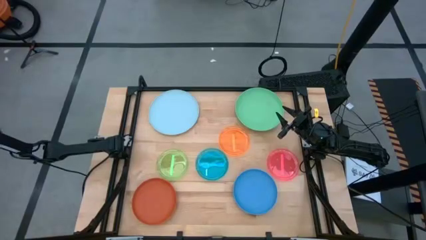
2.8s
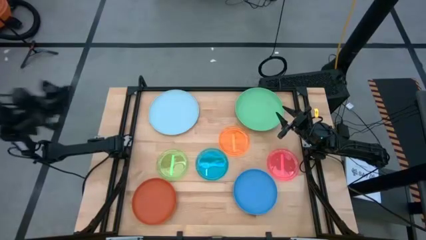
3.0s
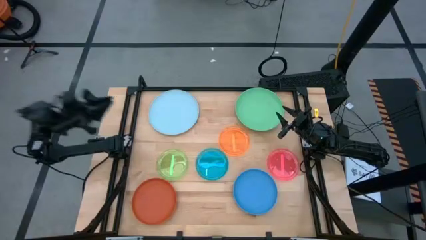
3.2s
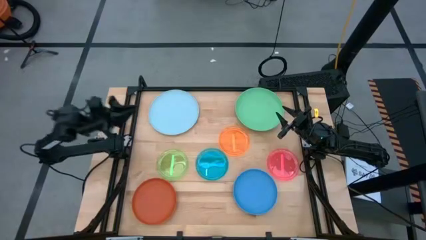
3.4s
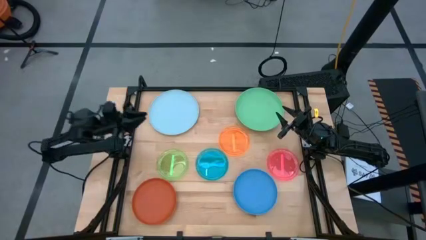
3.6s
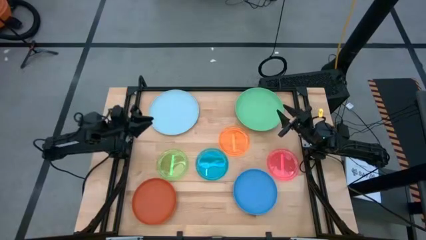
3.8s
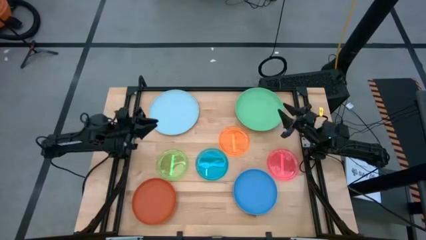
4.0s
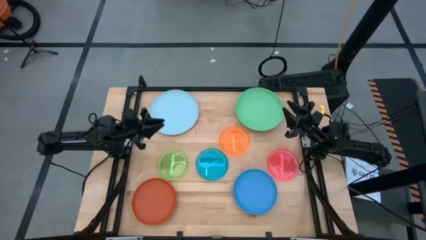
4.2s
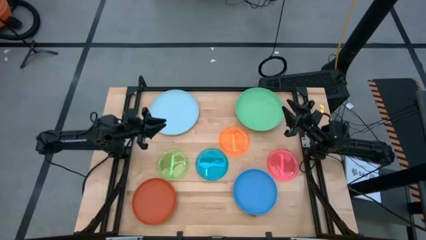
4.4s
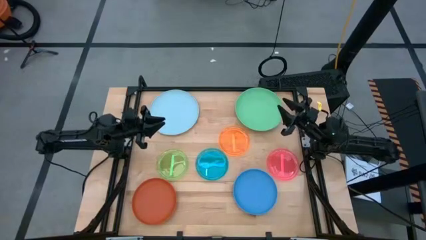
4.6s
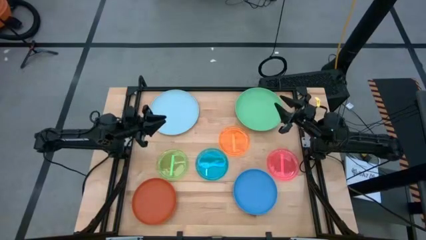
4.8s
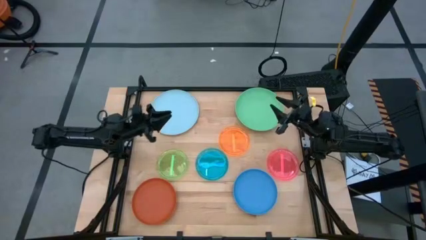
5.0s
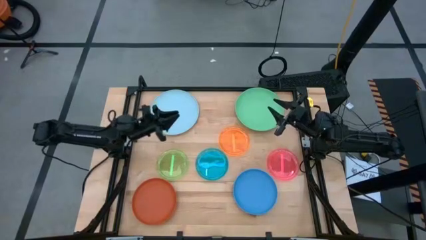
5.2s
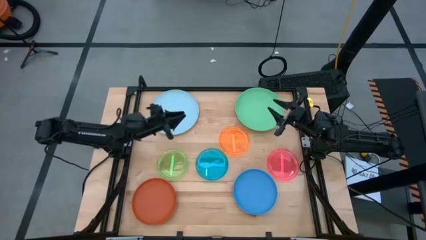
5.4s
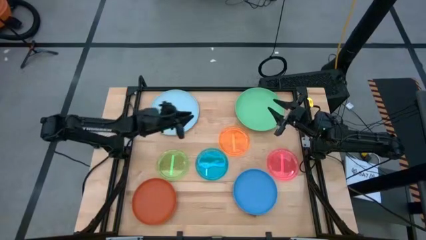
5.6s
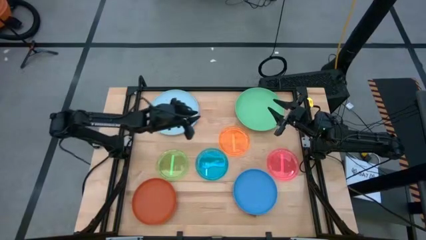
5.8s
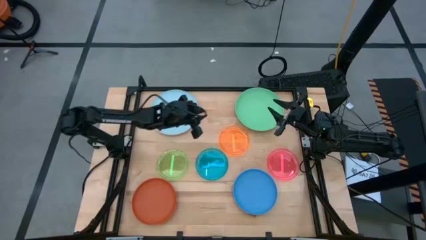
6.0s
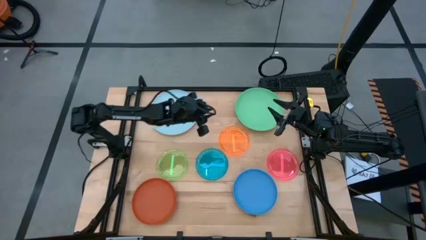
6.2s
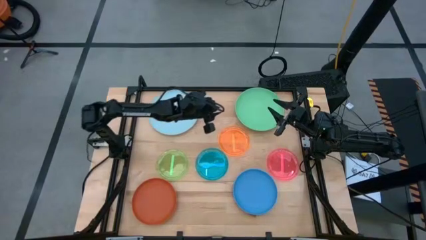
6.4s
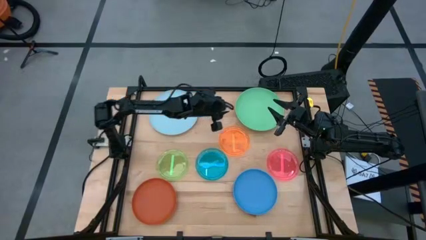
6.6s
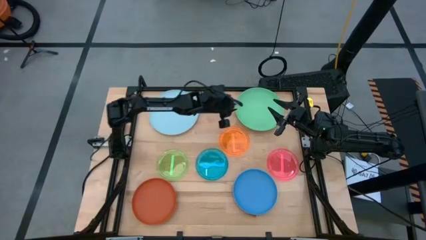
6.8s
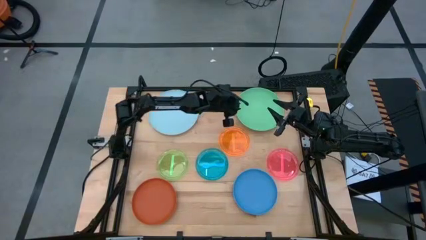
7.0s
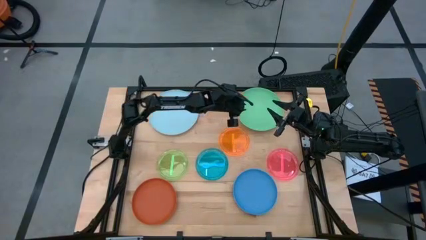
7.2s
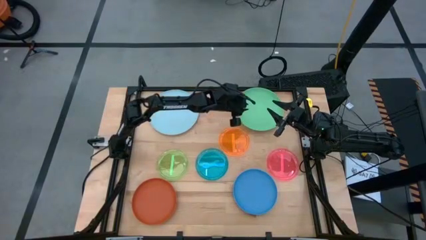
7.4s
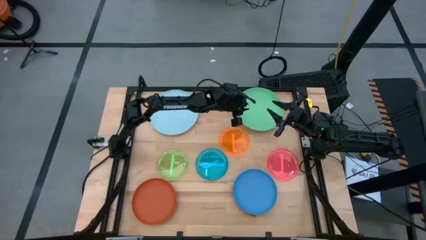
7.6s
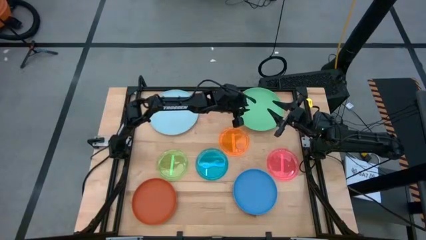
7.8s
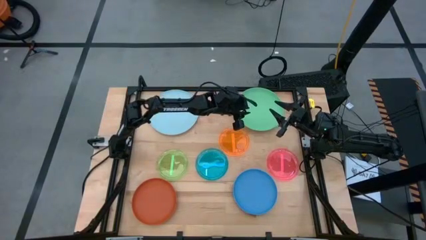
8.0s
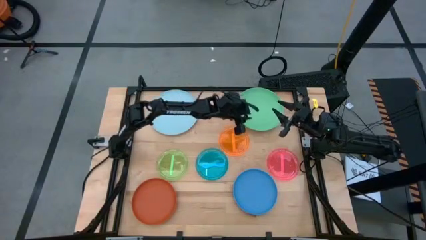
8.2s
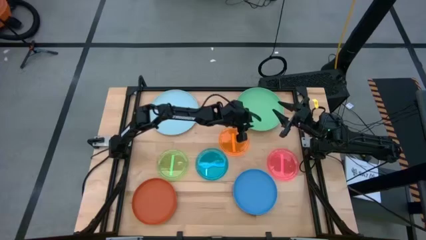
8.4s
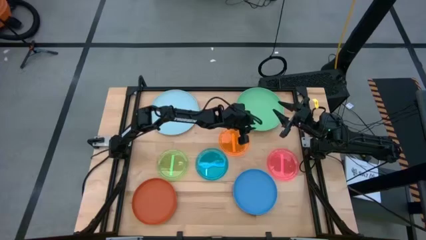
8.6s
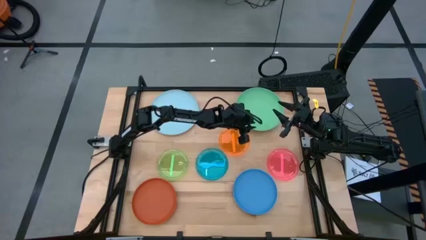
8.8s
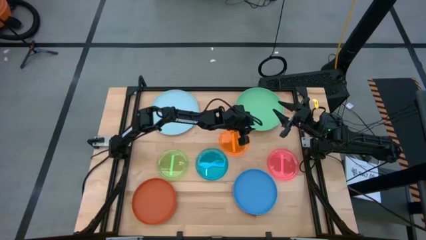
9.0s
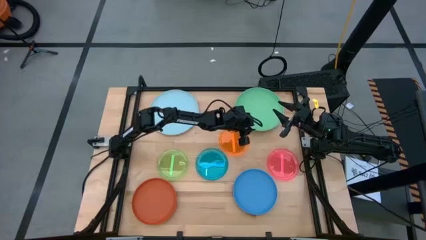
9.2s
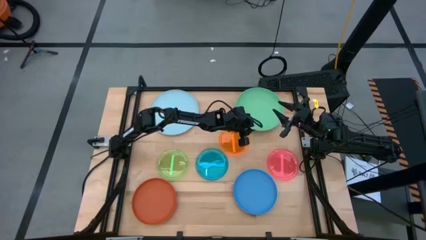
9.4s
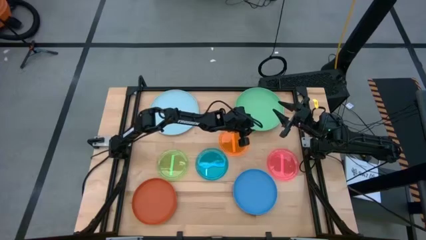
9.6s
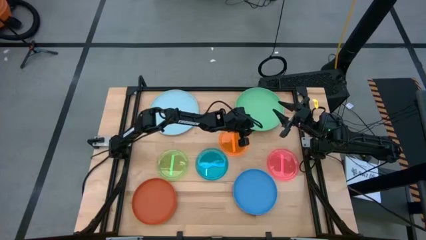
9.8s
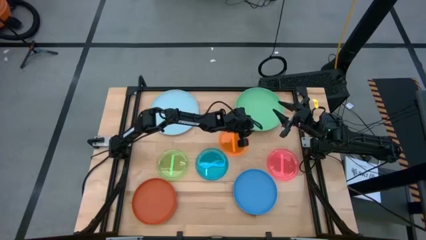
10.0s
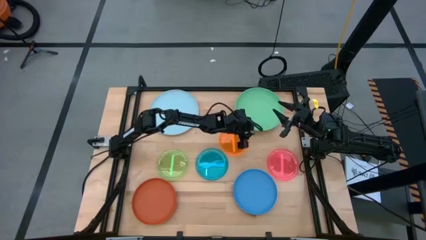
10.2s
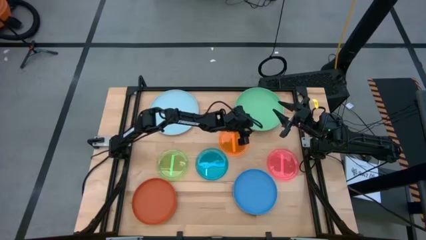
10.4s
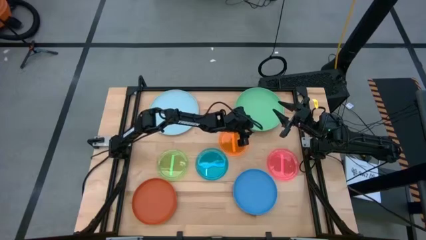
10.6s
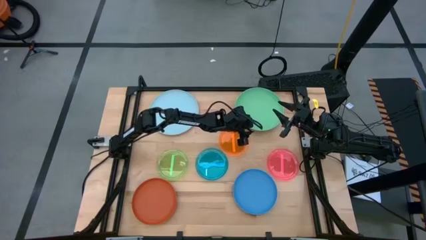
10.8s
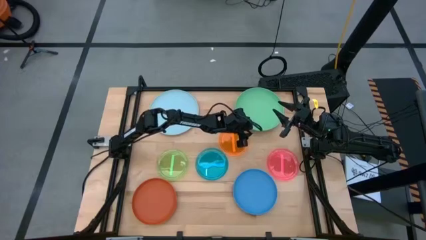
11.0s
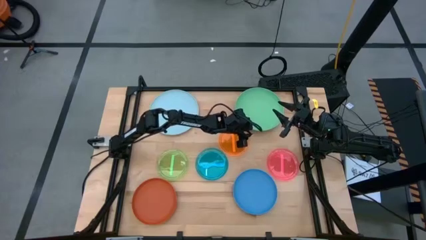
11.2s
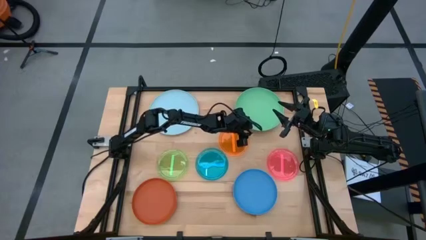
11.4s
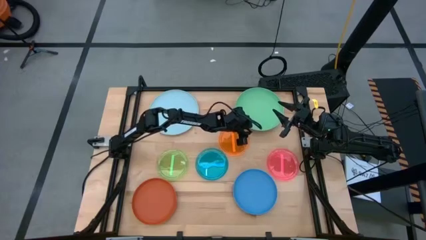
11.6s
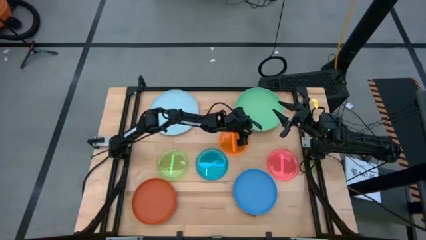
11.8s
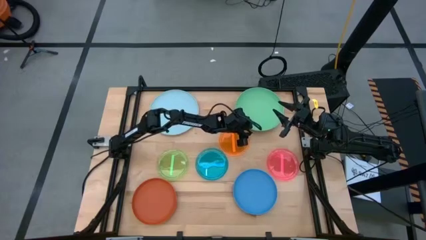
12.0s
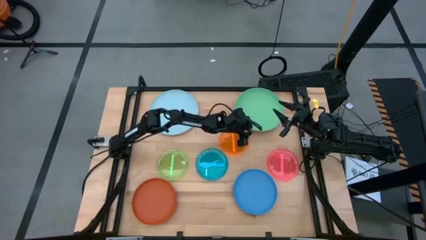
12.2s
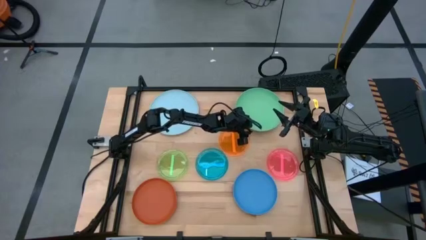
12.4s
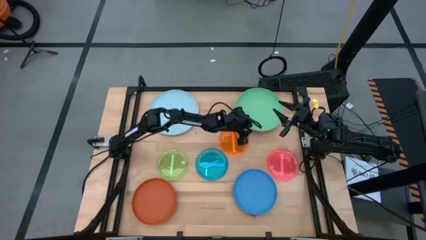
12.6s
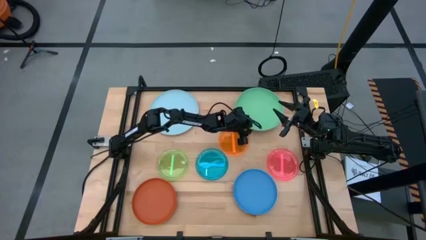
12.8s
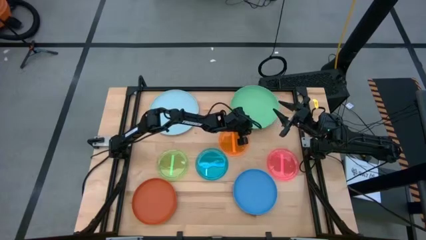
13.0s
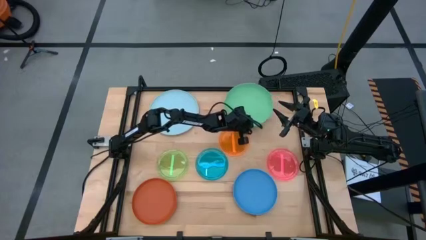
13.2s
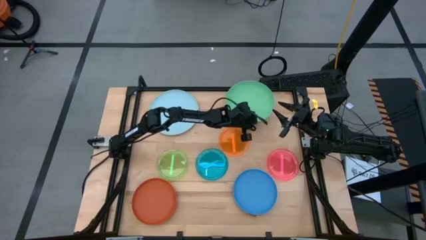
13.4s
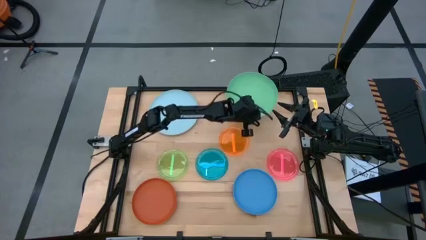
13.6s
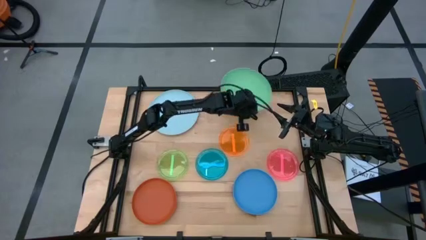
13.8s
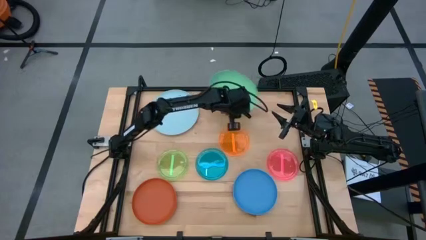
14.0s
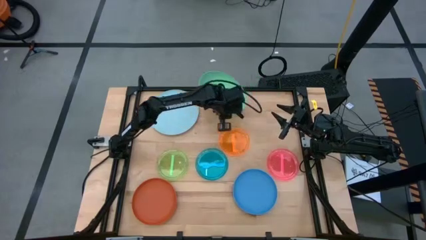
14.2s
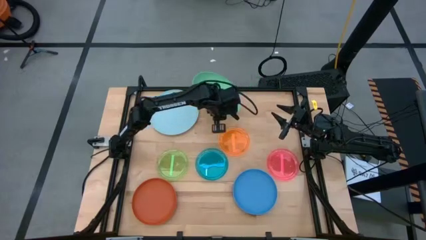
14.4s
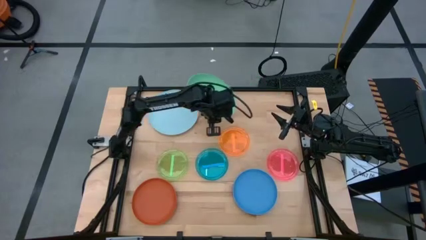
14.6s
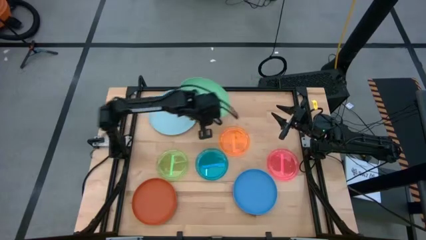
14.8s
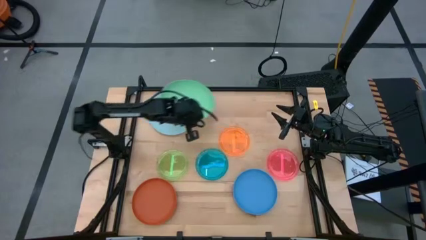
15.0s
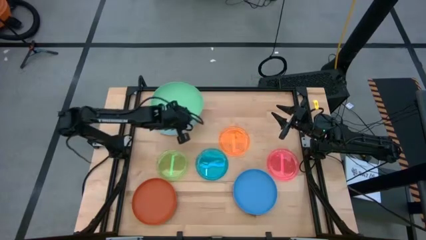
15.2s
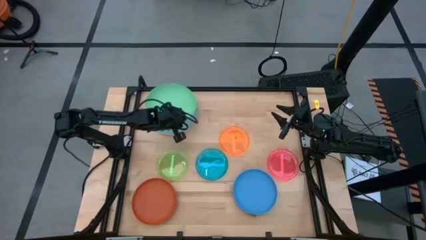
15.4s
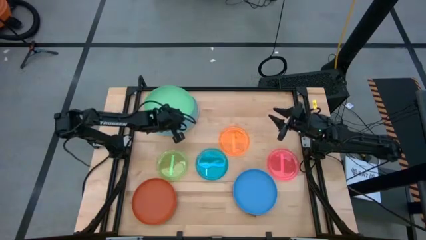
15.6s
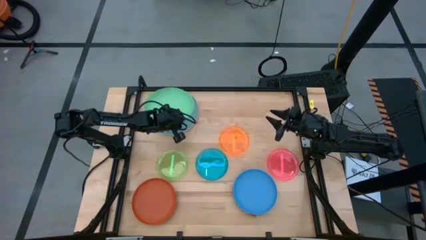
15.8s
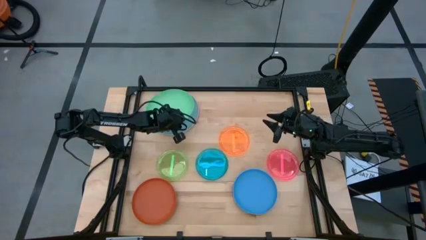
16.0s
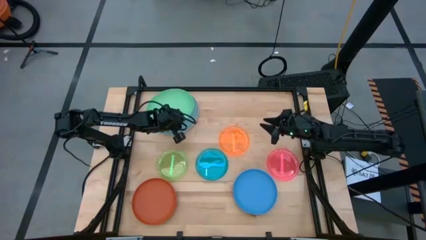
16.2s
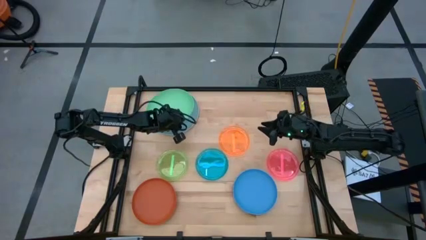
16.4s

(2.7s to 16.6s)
Task: Stack plastic plates
Stack the green plate on top of the gray plate
